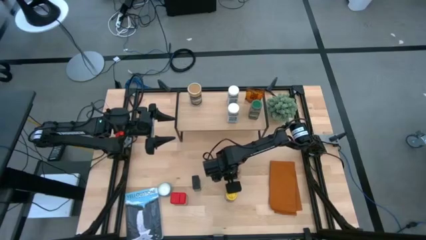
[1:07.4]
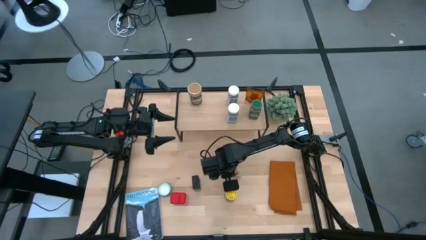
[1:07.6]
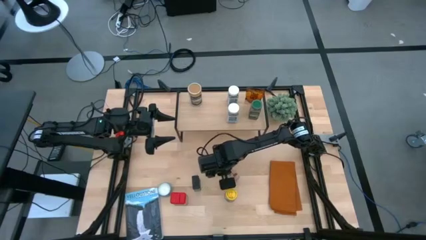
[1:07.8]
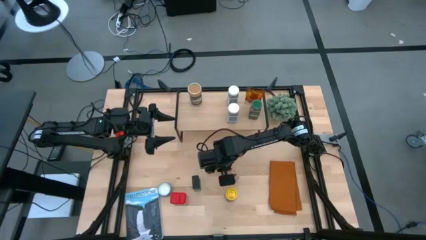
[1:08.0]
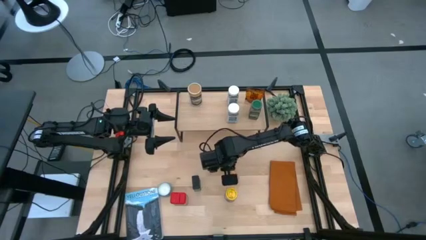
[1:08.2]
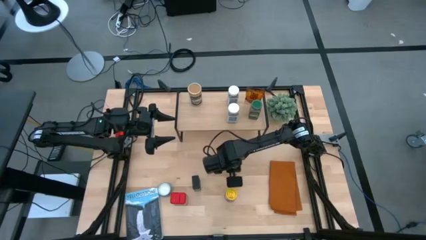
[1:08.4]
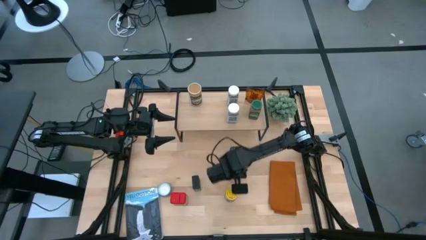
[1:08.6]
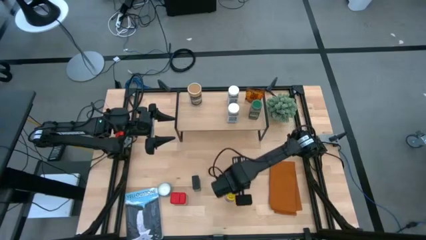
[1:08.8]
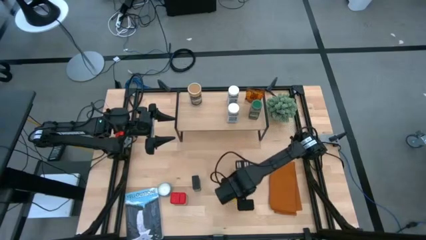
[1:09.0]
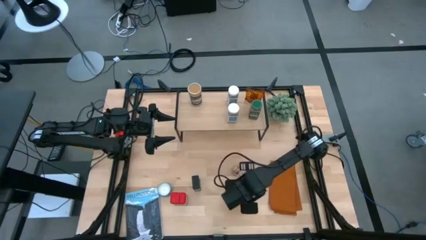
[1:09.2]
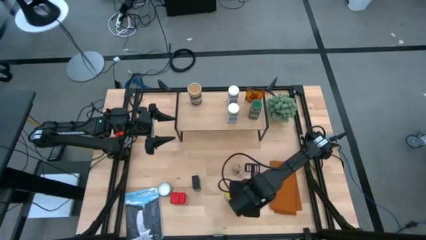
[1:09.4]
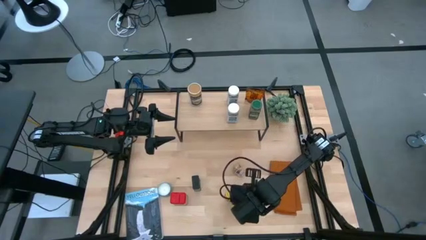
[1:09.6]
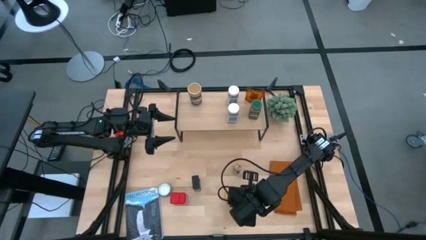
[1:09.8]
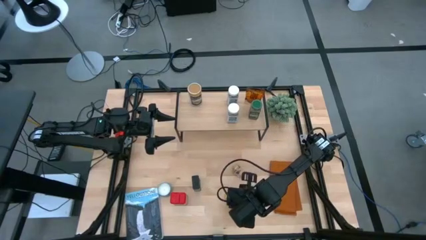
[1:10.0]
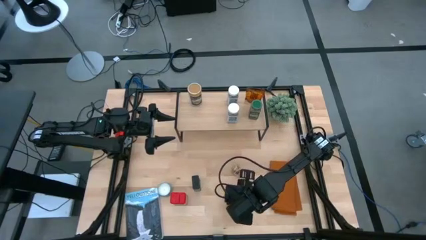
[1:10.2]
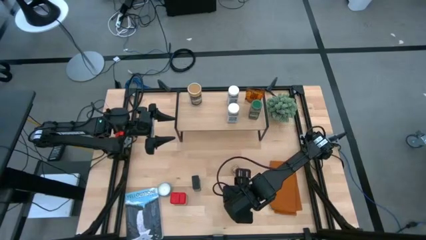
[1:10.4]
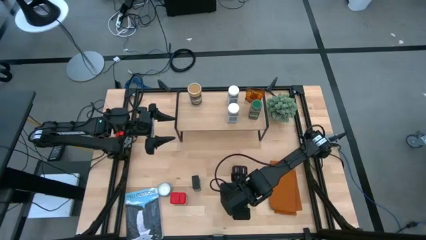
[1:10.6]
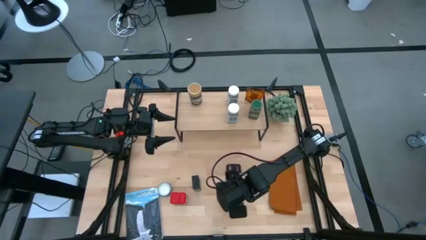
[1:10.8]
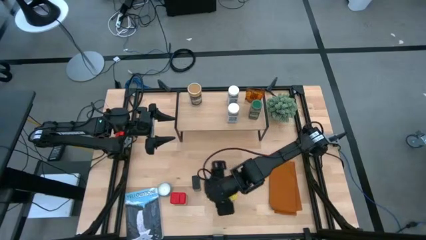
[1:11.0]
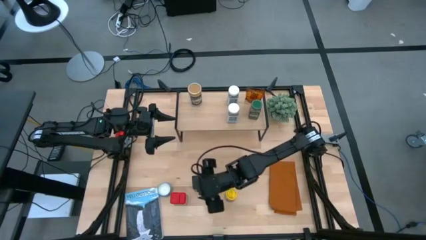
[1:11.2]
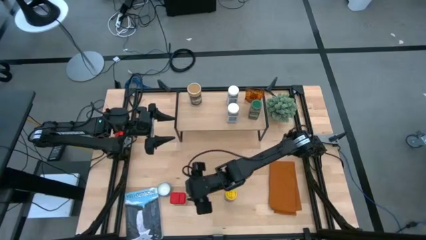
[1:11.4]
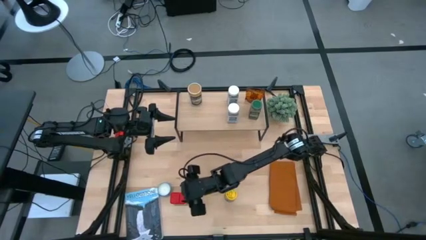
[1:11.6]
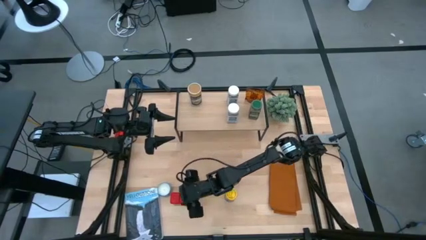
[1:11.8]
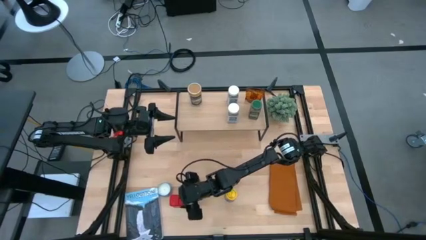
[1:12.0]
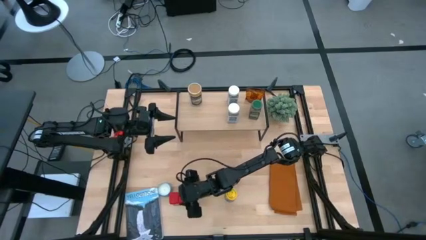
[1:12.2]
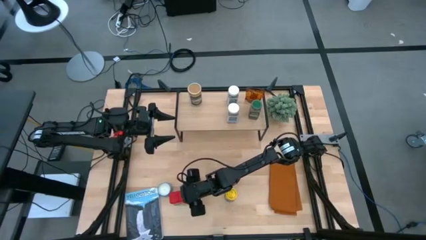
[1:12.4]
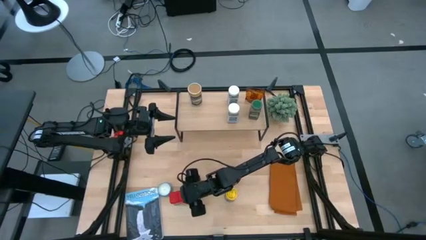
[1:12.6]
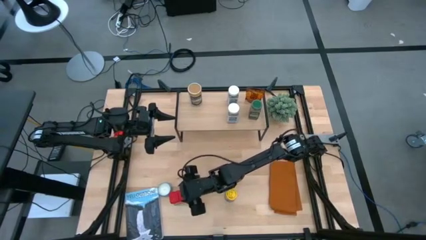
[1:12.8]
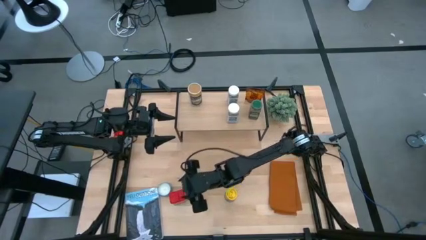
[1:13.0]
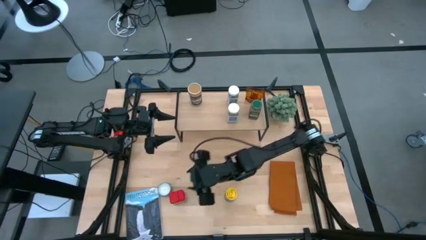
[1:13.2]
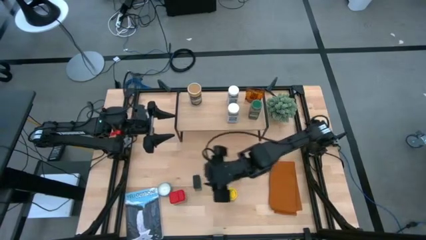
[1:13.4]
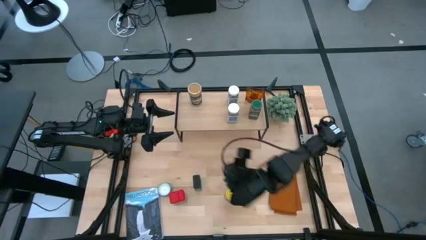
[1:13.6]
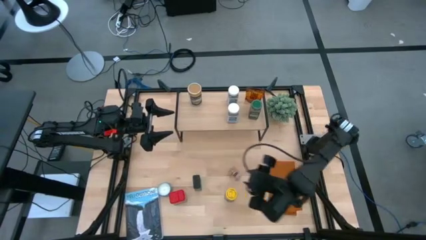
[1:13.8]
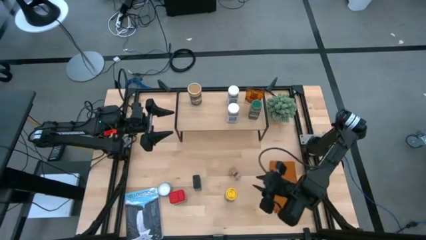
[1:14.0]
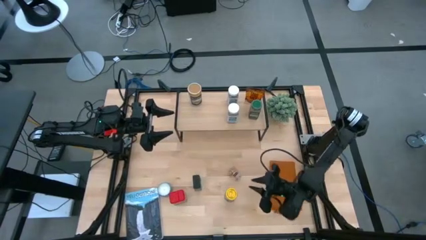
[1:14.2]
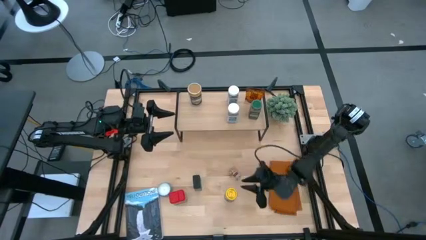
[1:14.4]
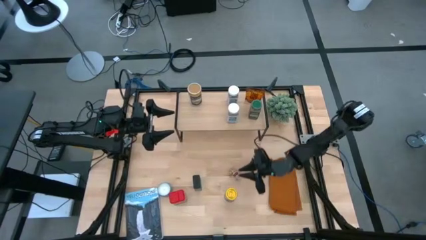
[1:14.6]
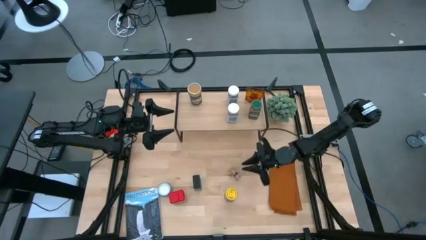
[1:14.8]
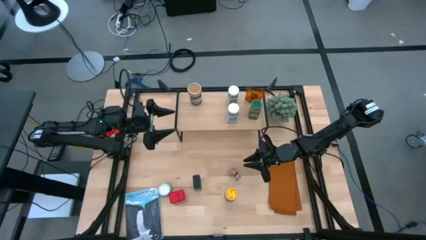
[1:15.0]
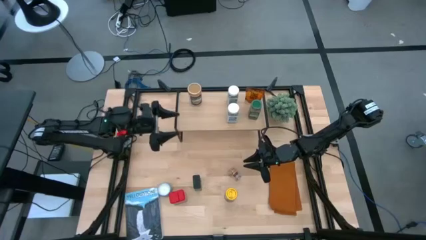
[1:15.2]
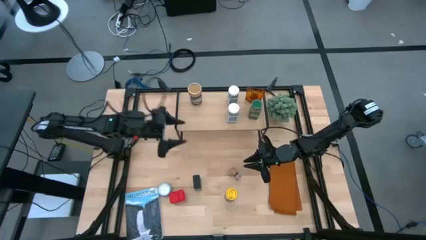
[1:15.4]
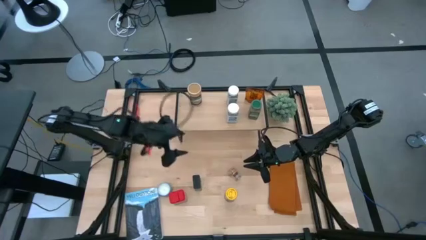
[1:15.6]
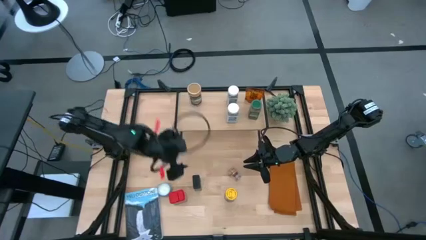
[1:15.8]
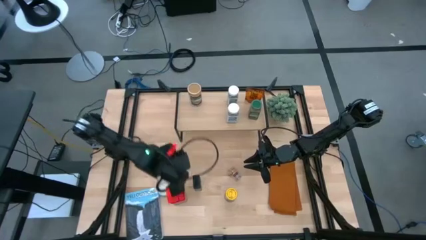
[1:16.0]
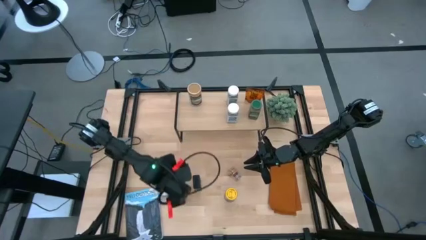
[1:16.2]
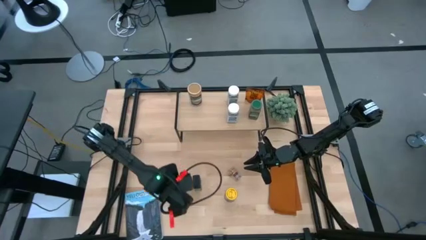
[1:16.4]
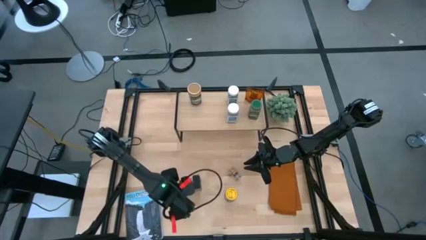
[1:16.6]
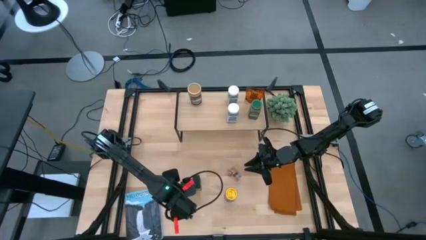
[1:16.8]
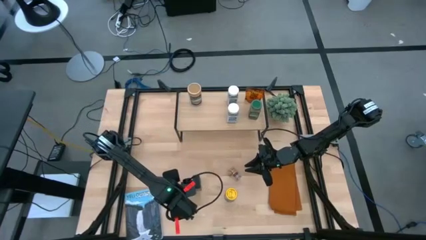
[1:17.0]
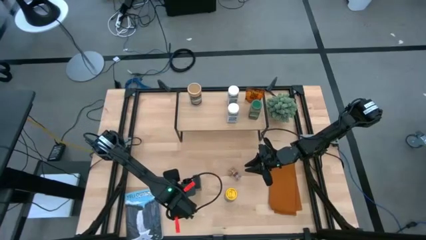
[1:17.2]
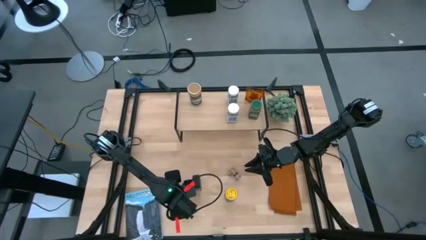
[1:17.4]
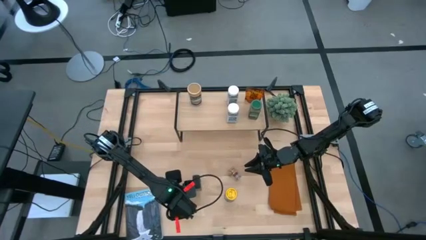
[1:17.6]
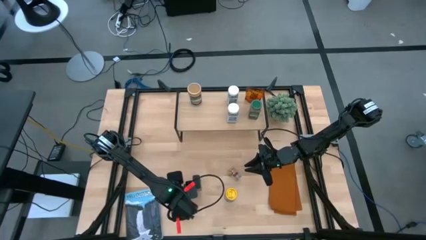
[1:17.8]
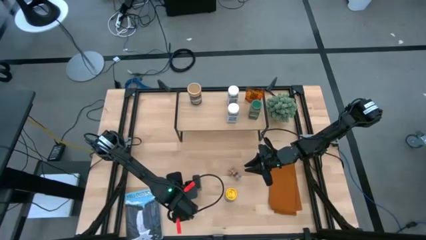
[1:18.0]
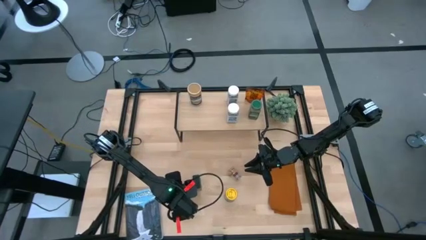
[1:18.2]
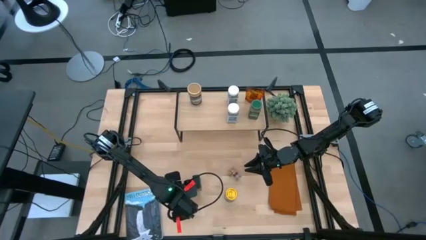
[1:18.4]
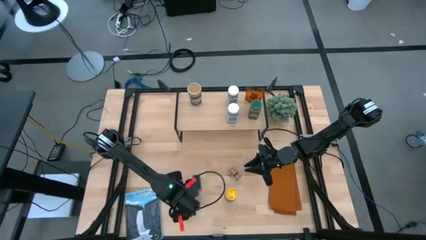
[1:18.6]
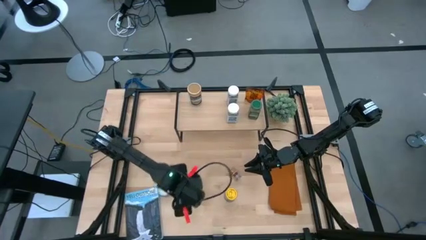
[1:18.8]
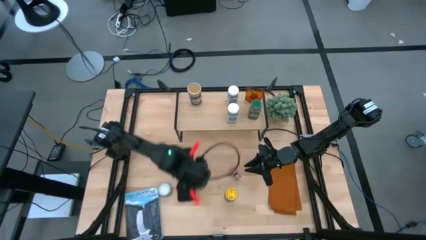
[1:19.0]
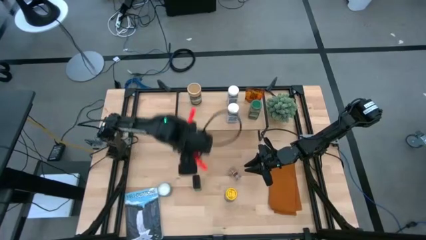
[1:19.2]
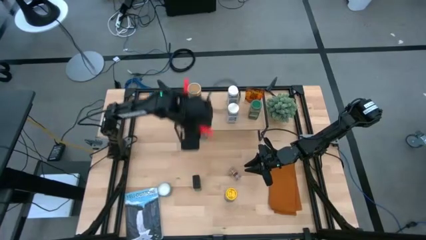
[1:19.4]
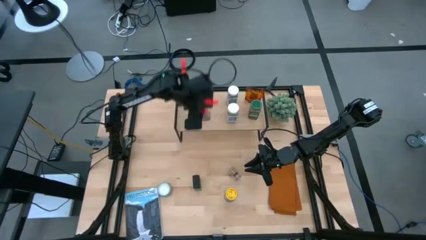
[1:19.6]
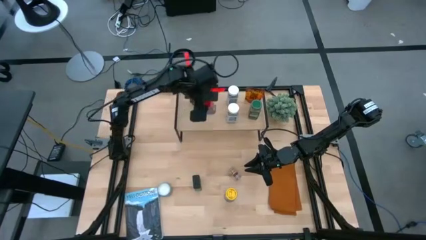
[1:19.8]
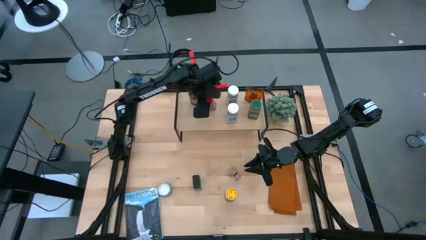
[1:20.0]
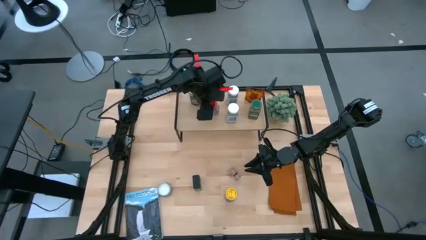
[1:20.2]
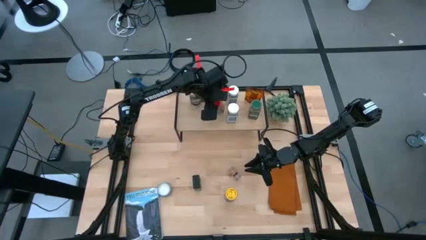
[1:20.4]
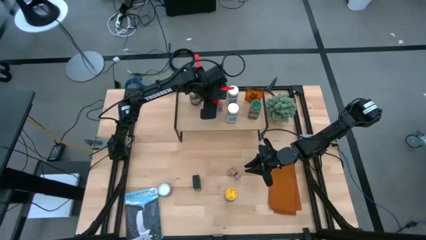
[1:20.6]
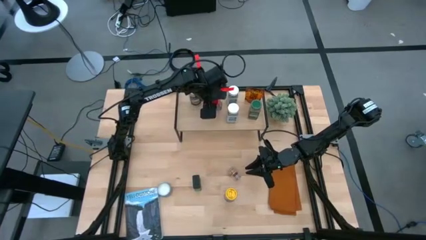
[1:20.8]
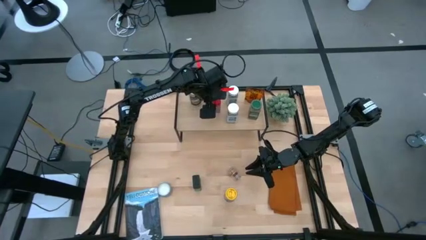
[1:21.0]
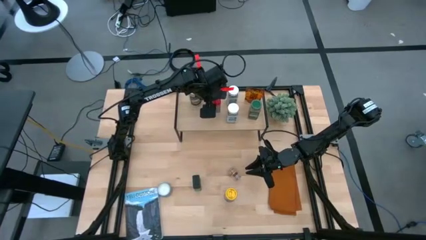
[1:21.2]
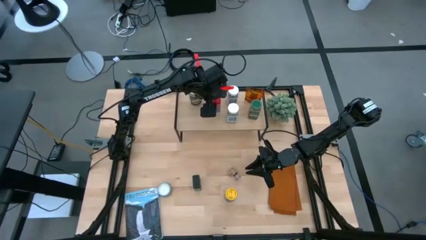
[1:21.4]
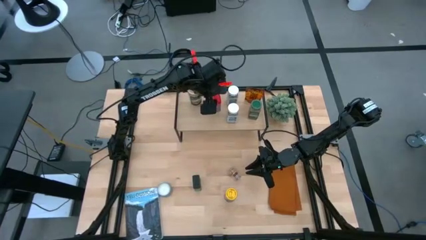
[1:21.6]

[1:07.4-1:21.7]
Task: Shelf spices
Put the red seasoning can on the shelf
